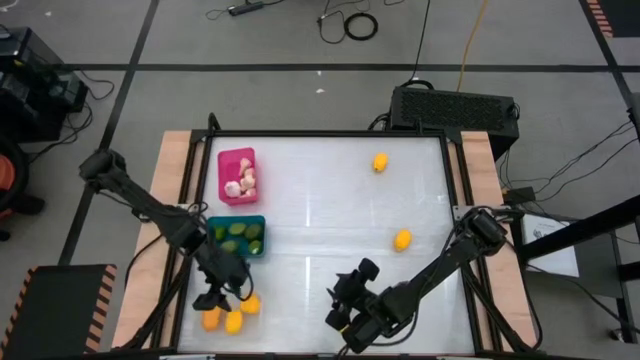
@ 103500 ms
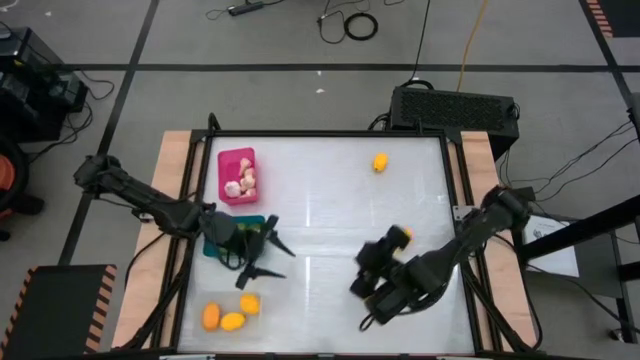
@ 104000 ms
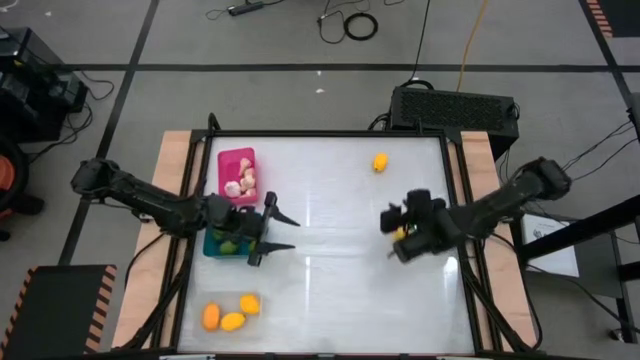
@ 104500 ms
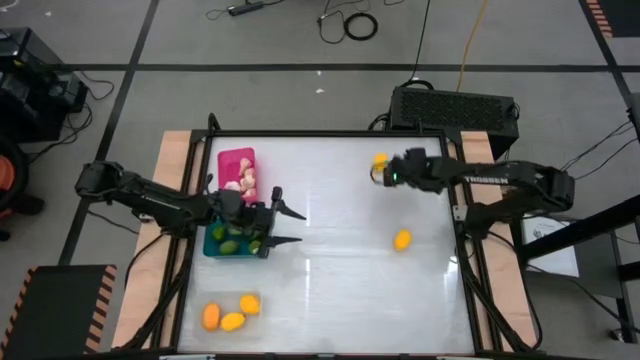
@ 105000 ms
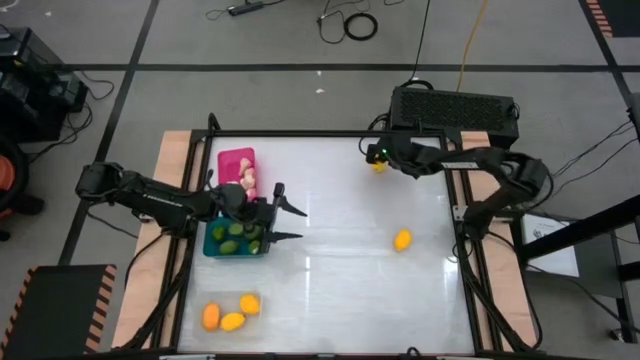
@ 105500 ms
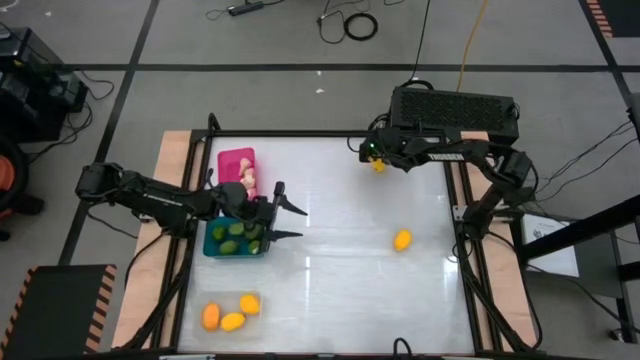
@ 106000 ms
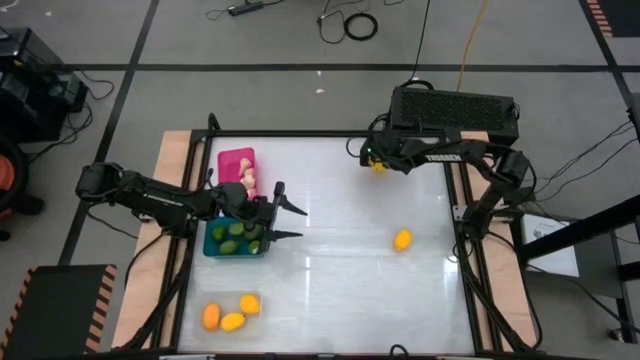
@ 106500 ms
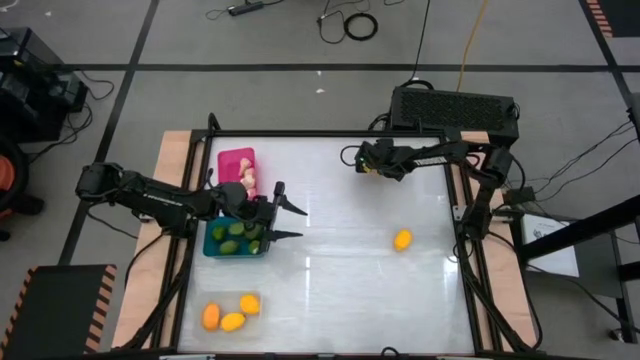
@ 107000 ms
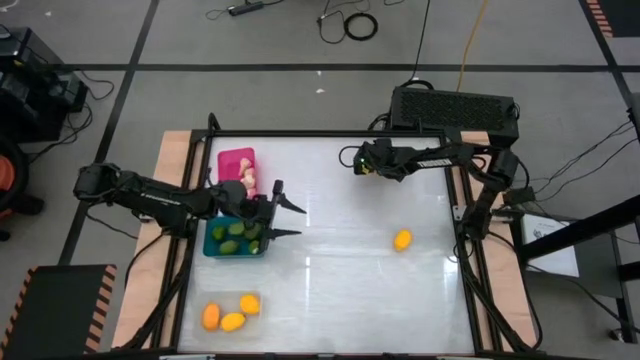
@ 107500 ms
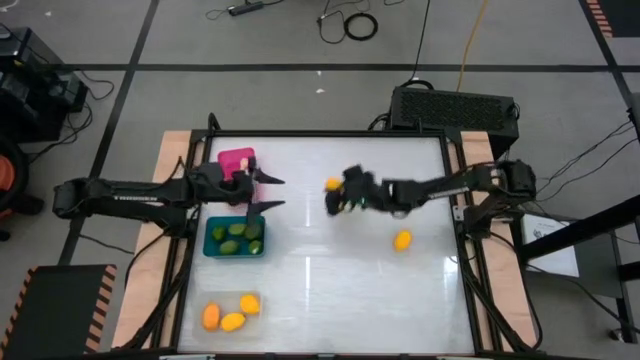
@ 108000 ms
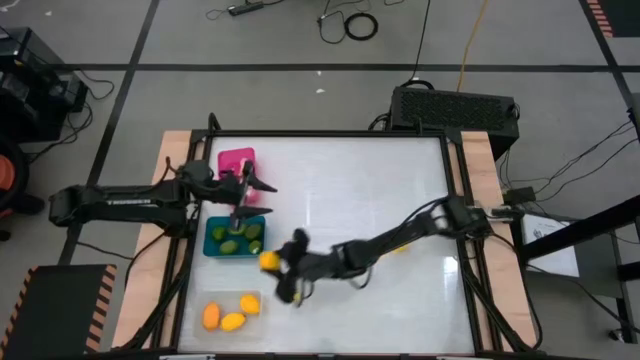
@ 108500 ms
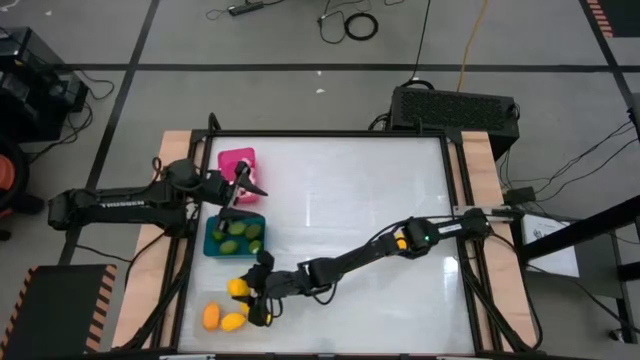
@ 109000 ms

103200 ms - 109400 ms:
Task: Sort produce into baskets
Put the yellow lime into the transparent bin

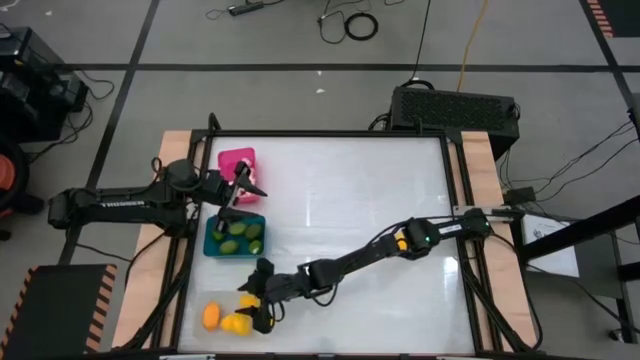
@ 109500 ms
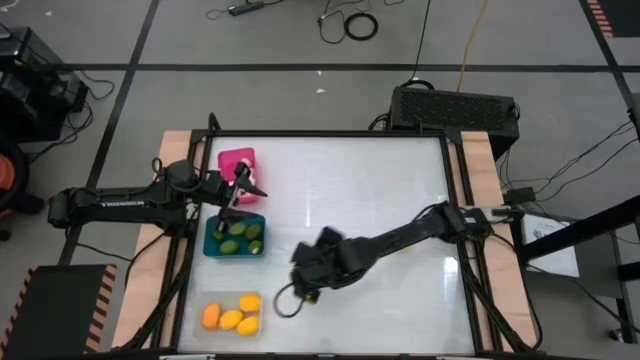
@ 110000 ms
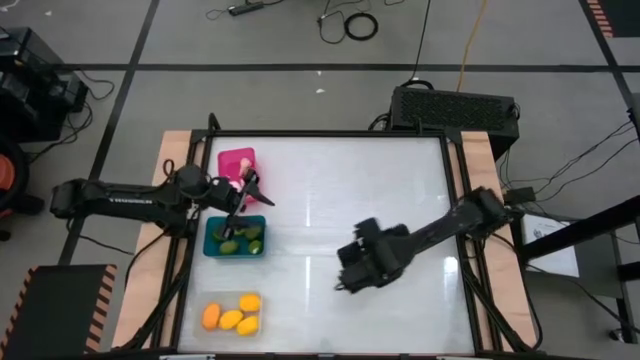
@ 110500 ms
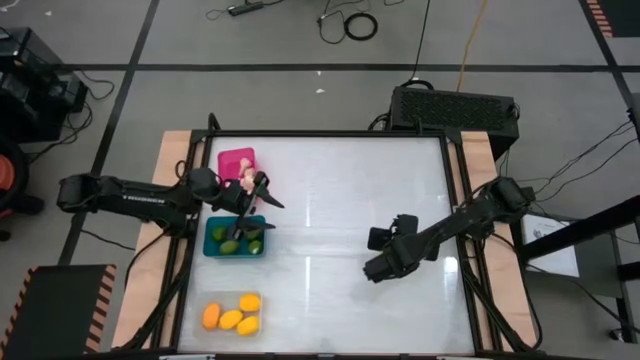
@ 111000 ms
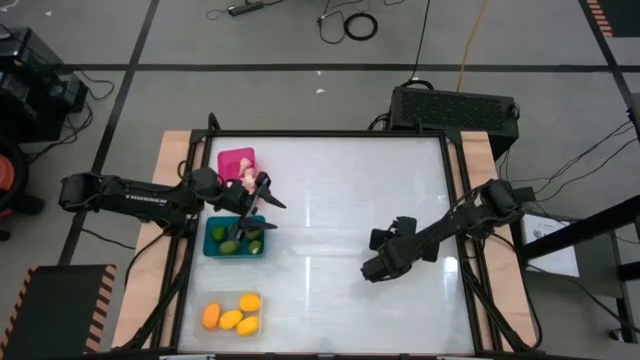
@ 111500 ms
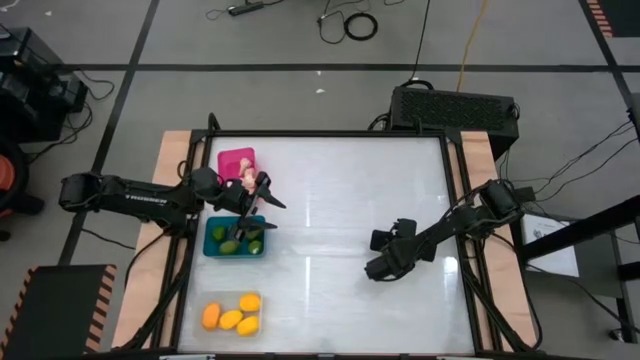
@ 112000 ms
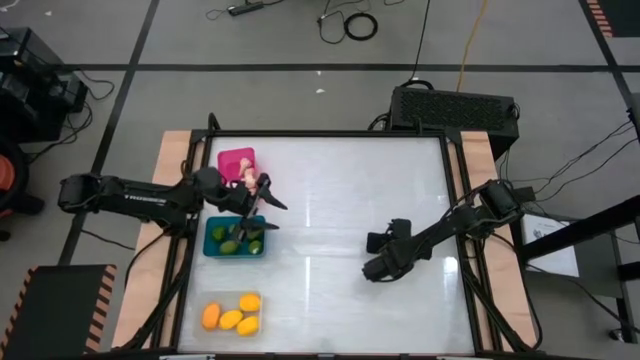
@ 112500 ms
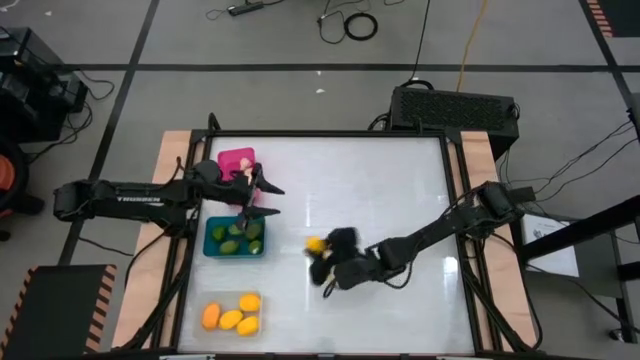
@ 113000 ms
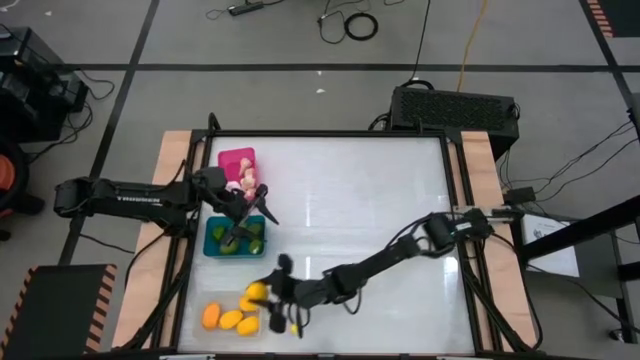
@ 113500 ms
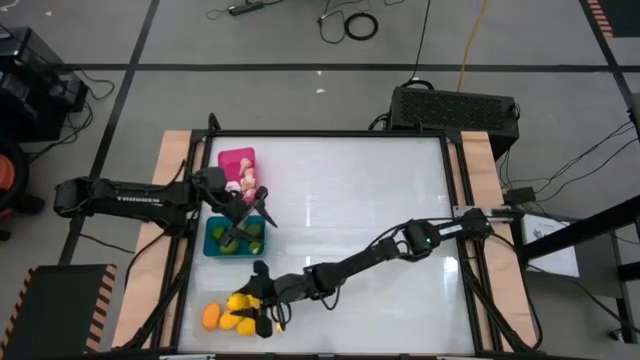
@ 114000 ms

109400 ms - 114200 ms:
Put the yellow lime into the transparent bin

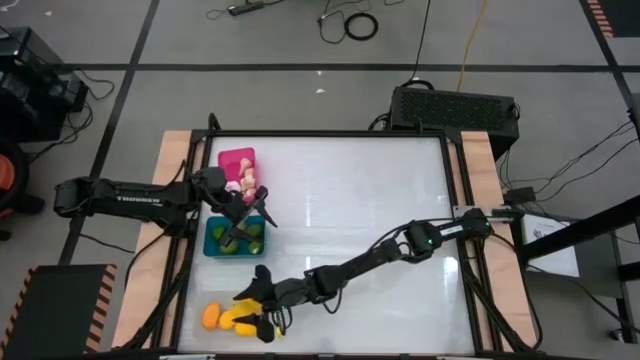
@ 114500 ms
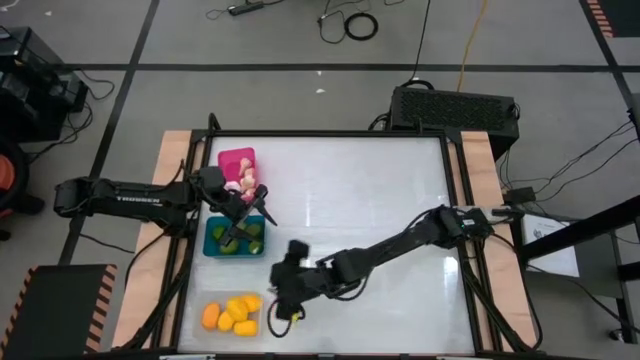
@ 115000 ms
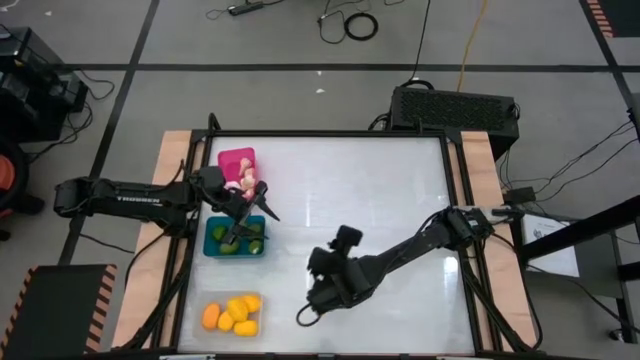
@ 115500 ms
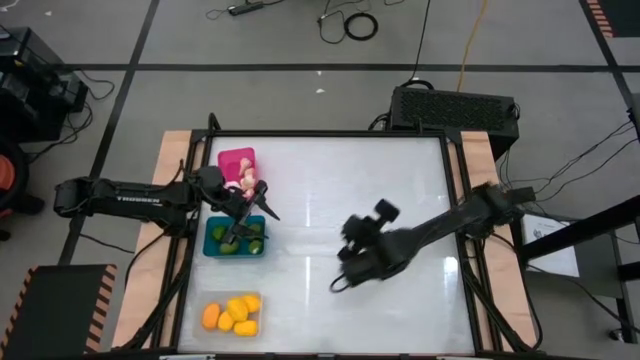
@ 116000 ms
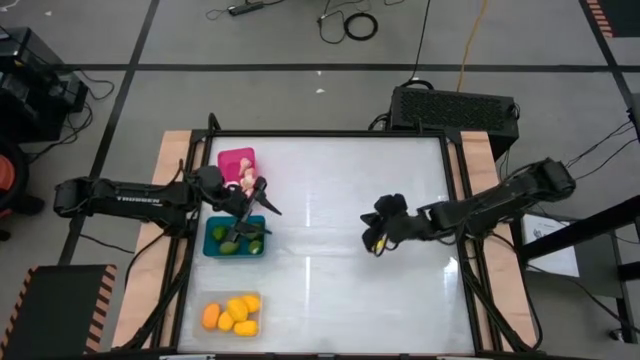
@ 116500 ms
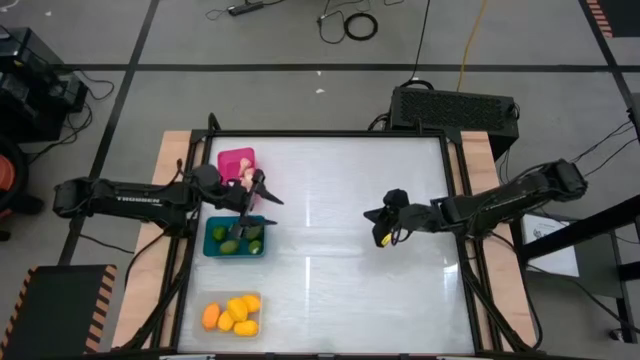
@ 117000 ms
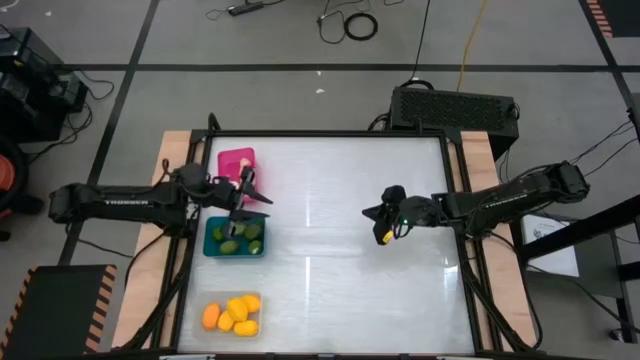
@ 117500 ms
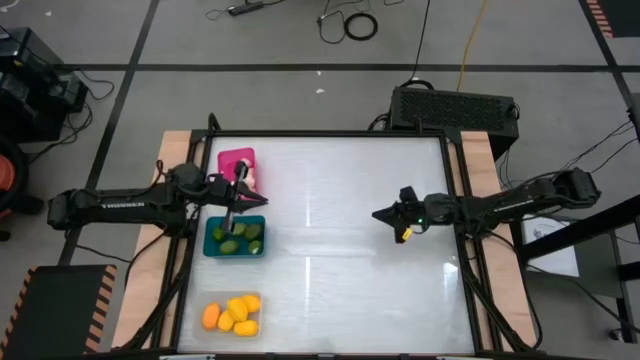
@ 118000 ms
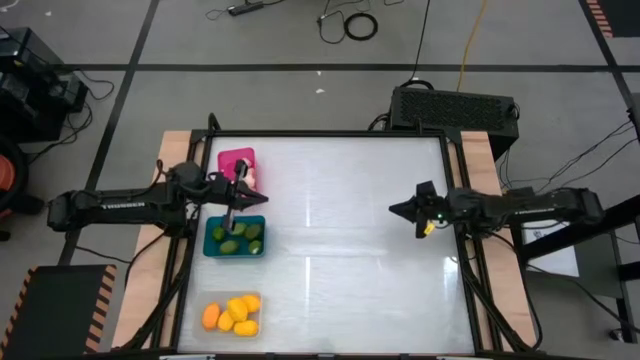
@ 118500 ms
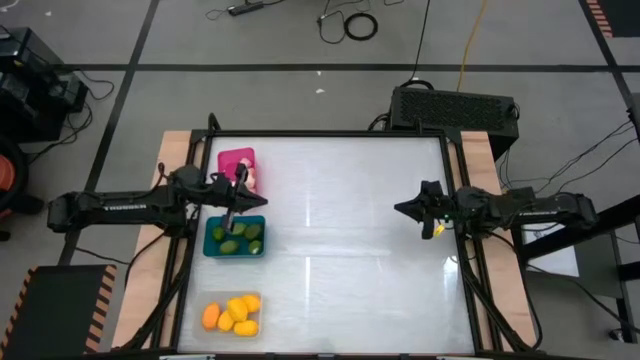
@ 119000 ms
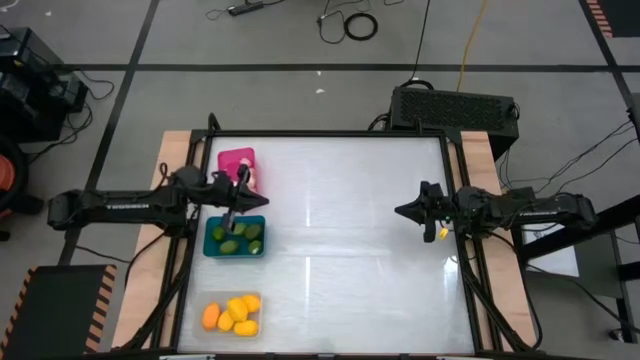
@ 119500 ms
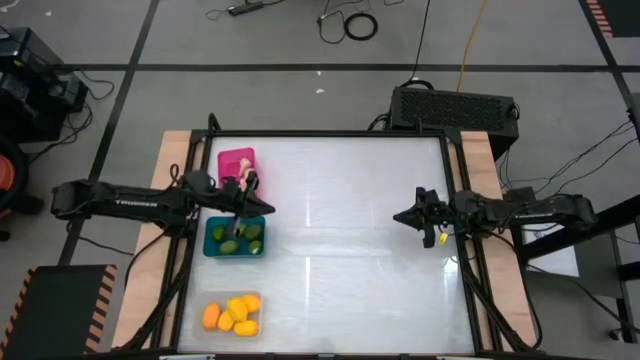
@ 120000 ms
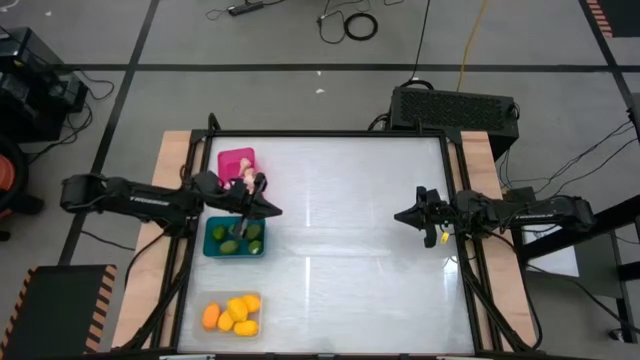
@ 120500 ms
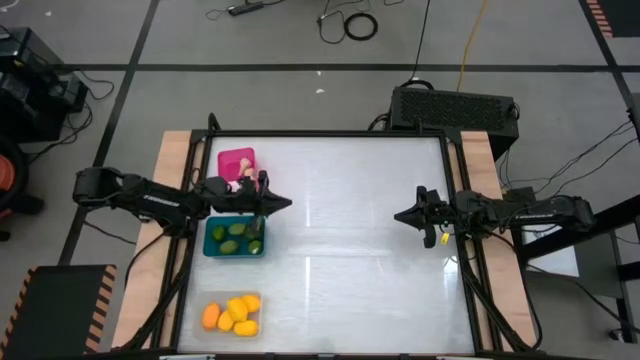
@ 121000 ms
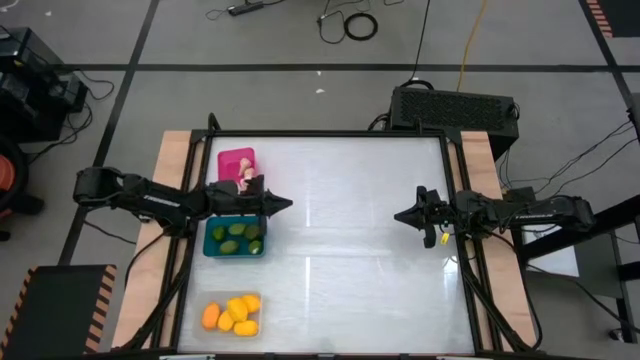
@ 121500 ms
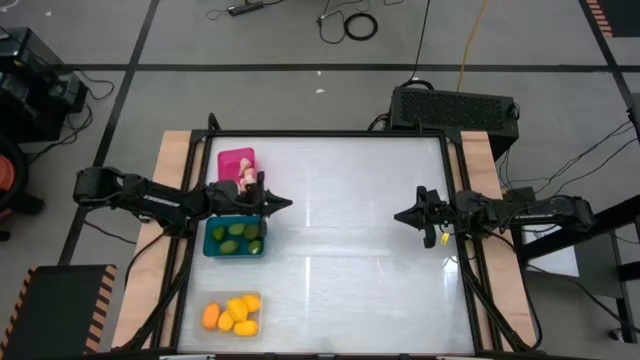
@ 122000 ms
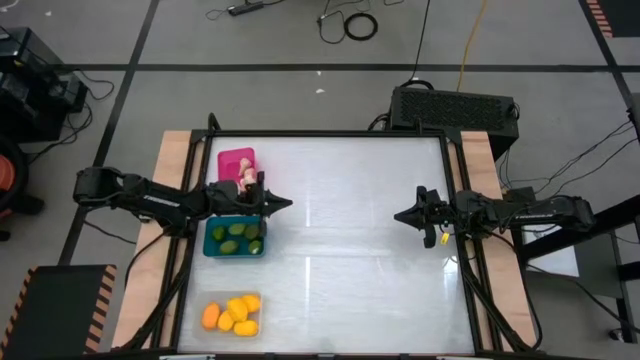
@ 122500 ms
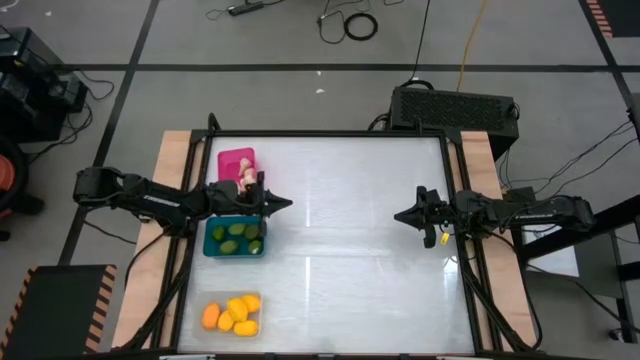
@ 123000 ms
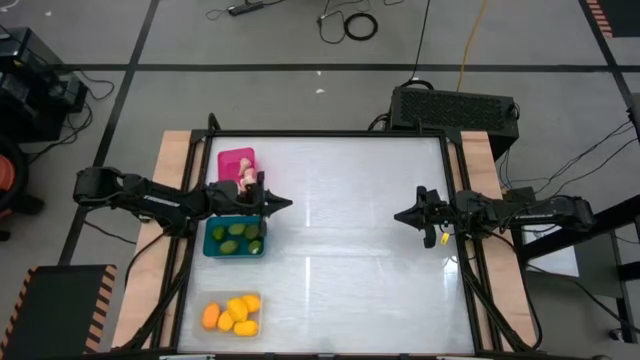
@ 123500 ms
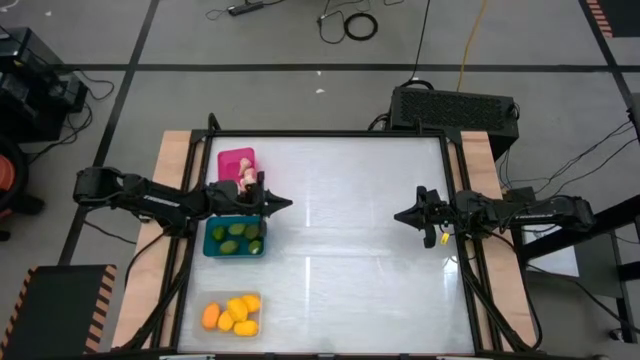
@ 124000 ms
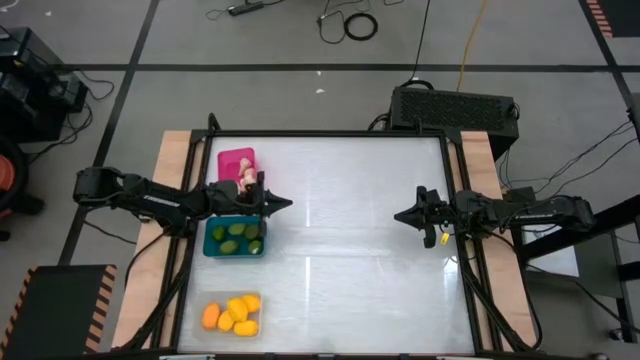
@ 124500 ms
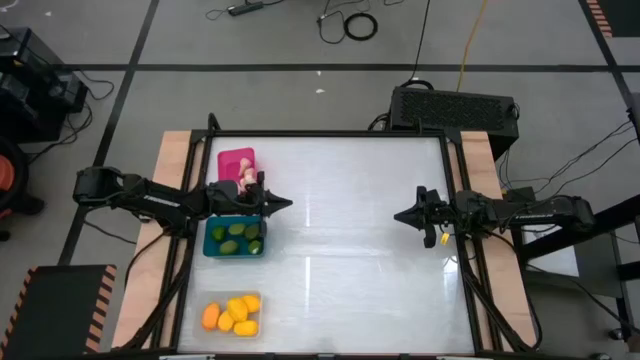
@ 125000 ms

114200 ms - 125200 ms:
Return to Home Position
